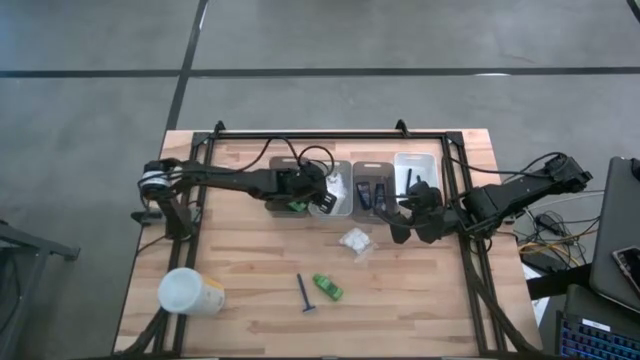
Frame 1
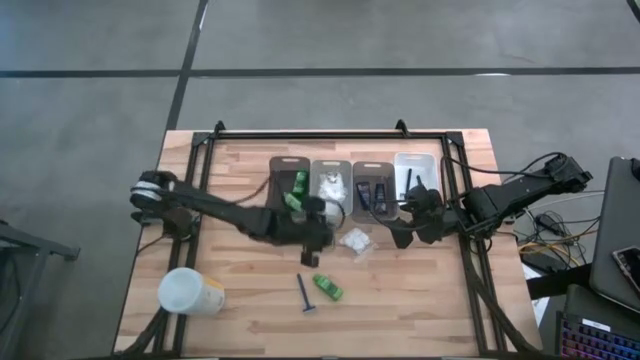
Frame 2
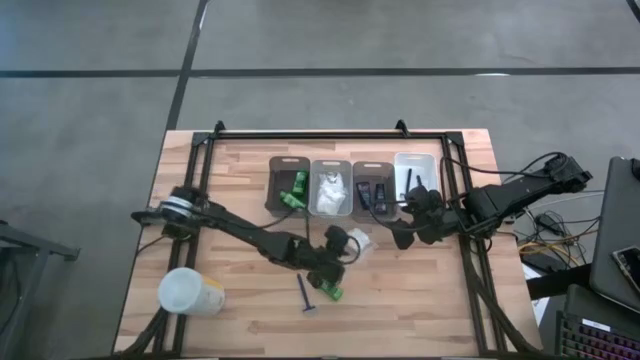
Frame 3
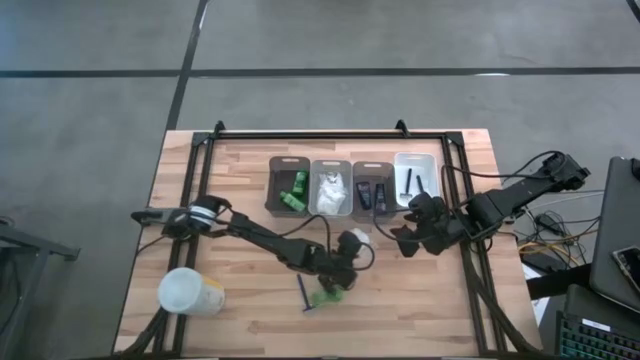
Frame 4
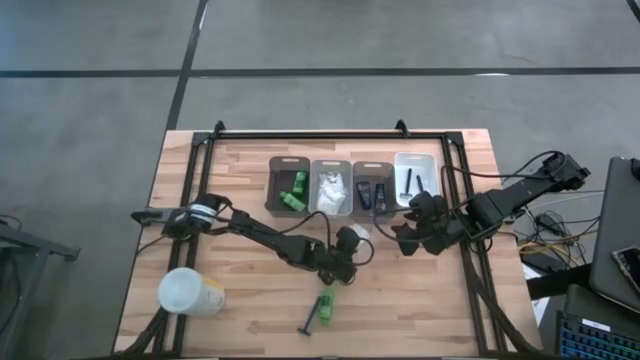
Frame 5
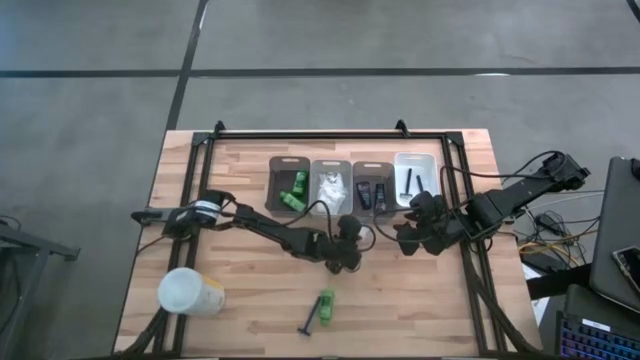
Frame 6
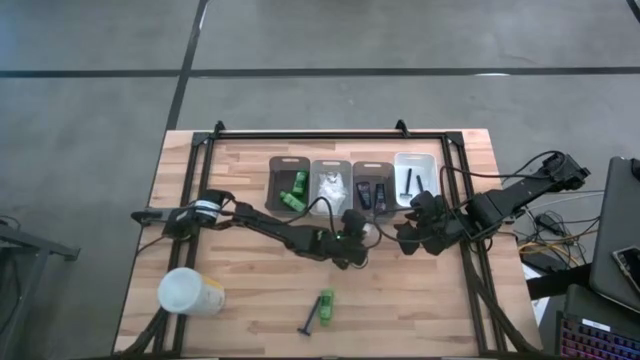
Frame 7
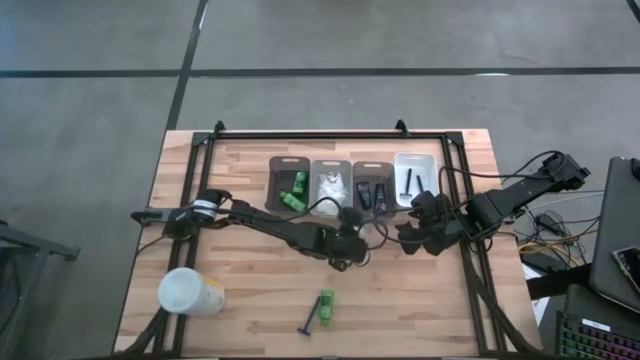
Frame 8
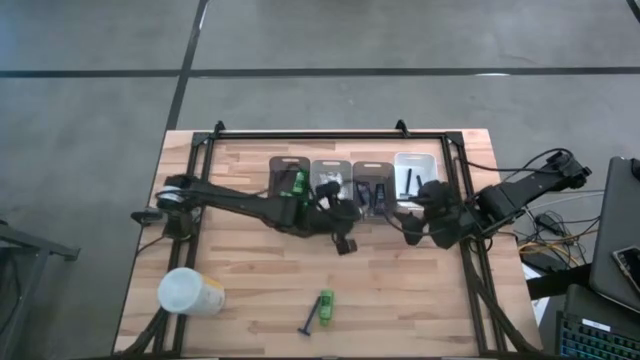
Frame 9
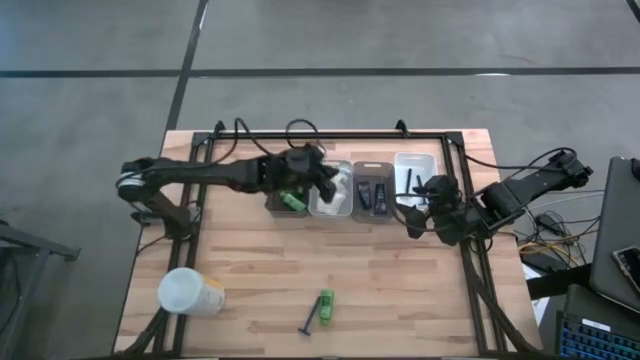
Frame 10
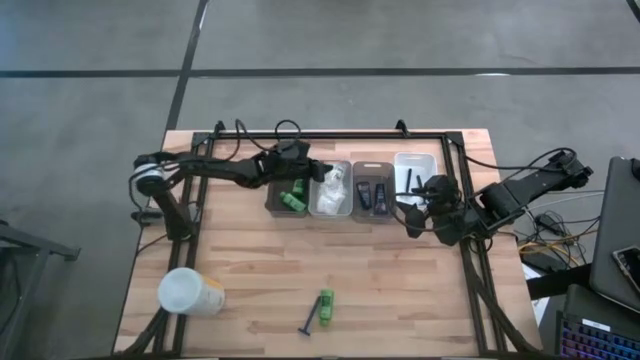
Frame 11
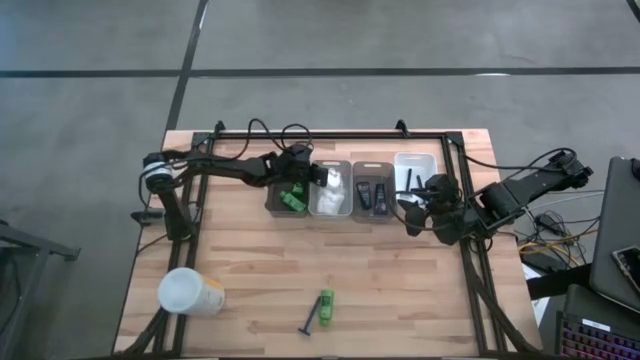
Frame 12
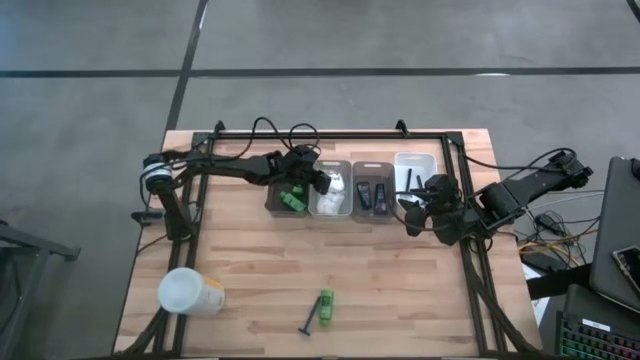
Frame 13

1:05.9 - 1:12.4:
Task: Pick & Place Travel size toiletries
Put the white cotton pack into the gray bin

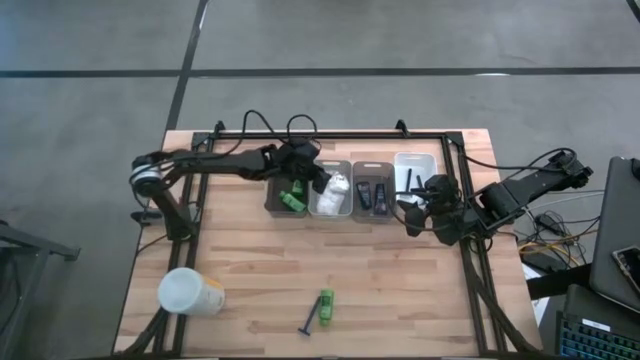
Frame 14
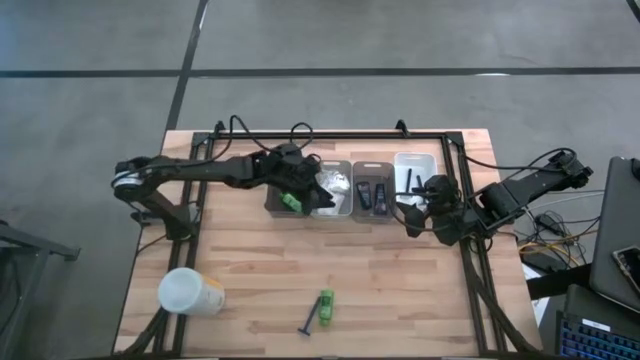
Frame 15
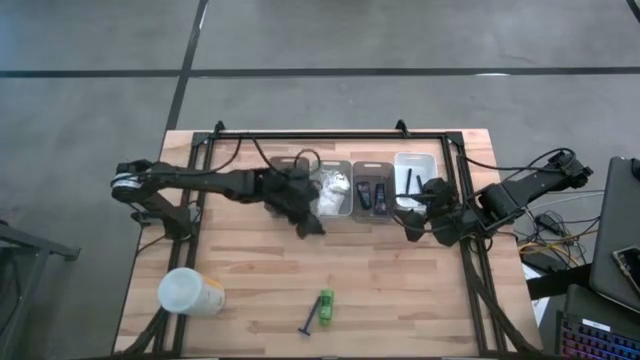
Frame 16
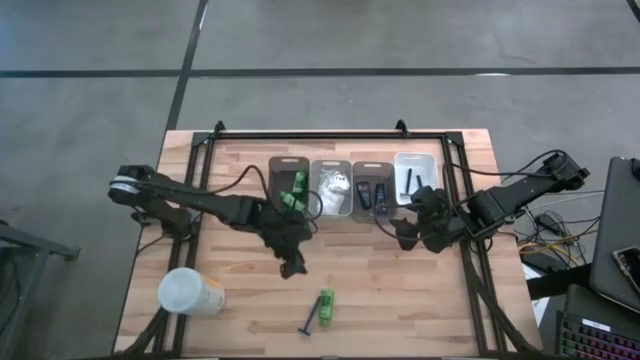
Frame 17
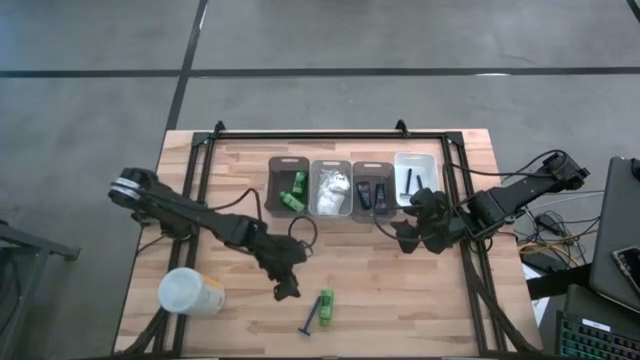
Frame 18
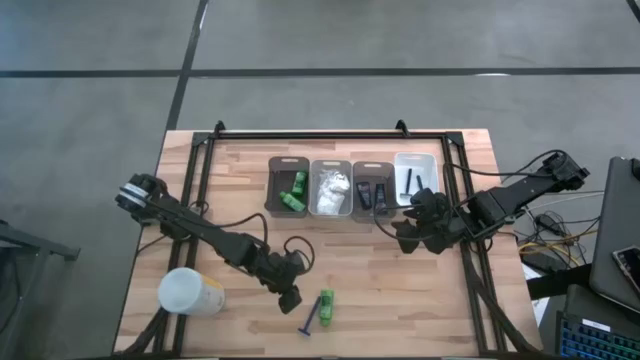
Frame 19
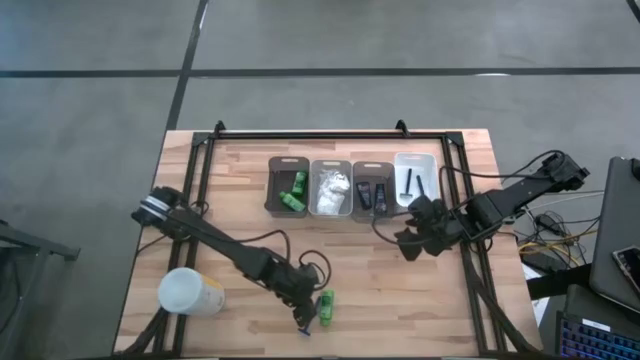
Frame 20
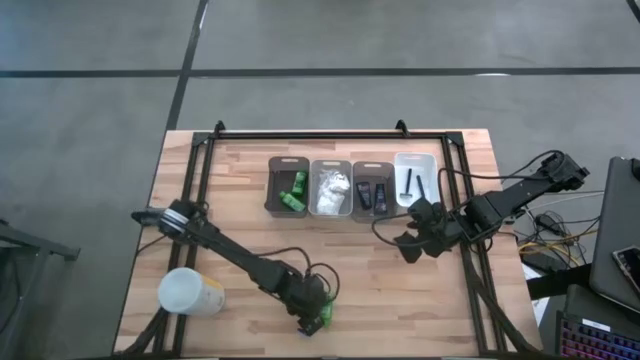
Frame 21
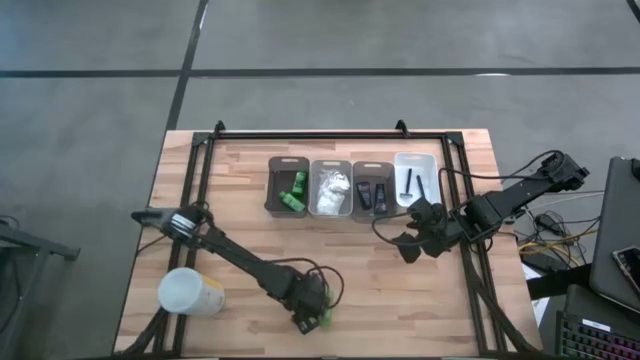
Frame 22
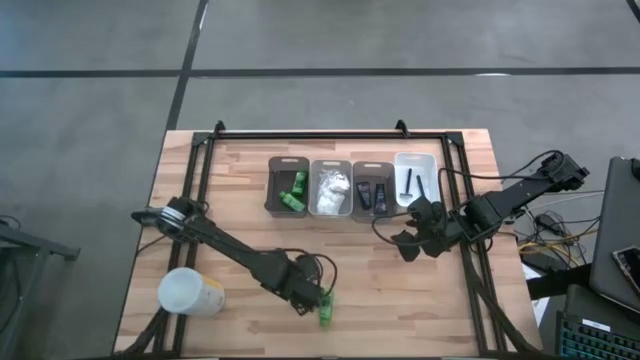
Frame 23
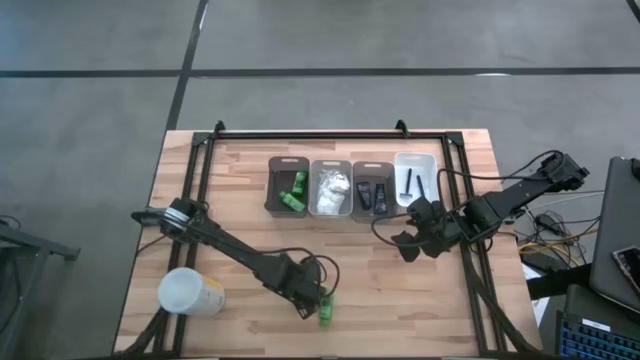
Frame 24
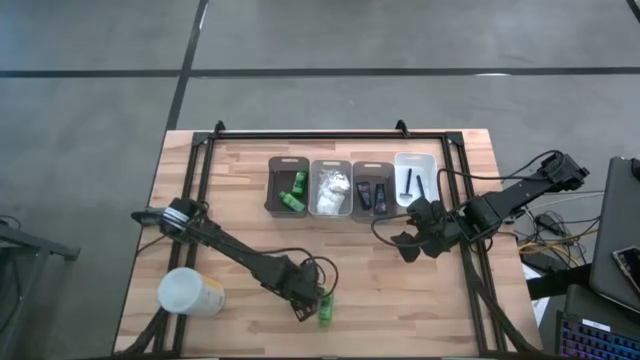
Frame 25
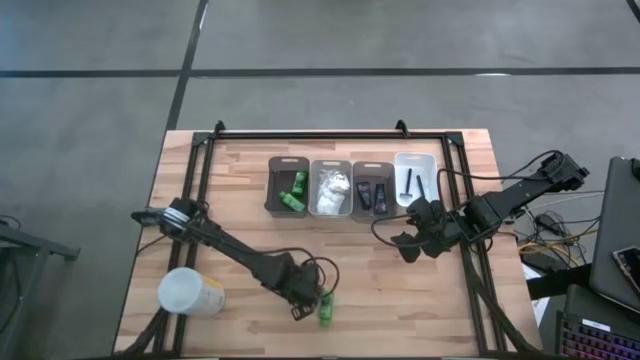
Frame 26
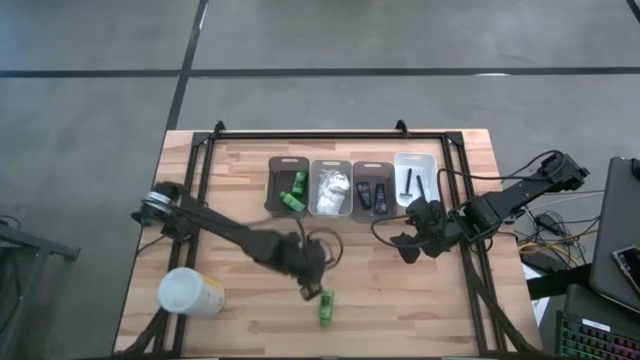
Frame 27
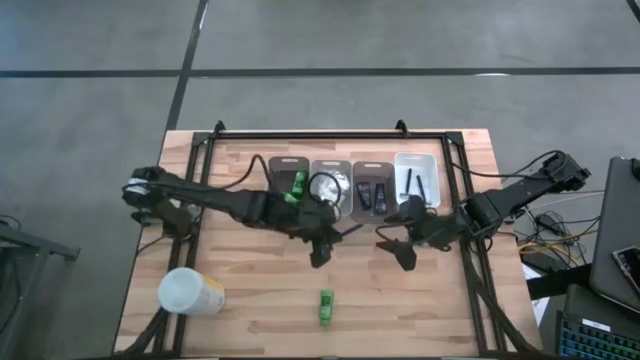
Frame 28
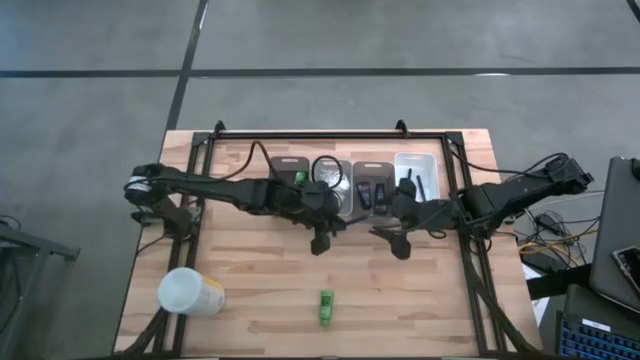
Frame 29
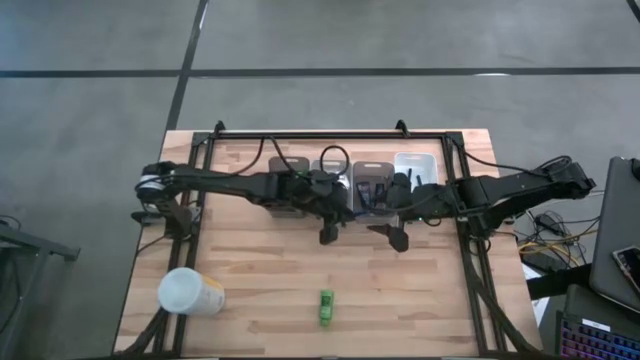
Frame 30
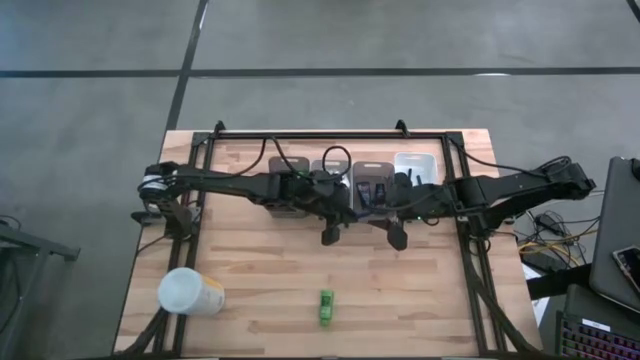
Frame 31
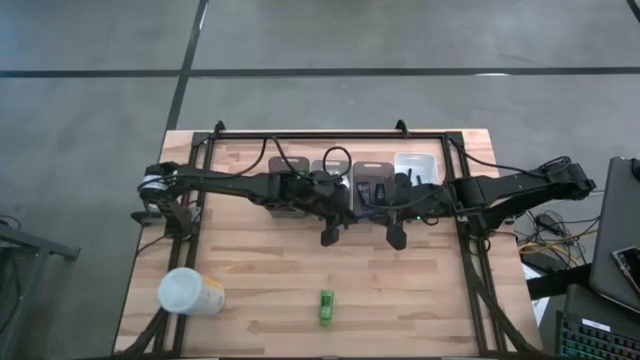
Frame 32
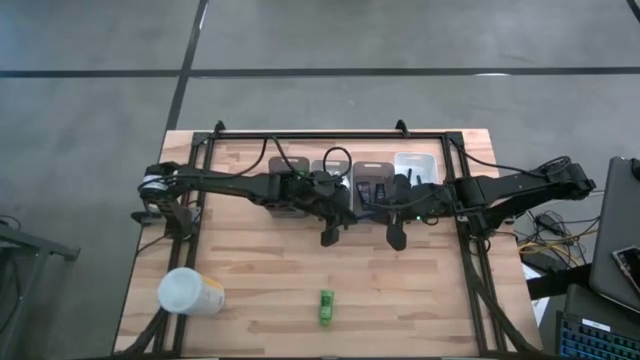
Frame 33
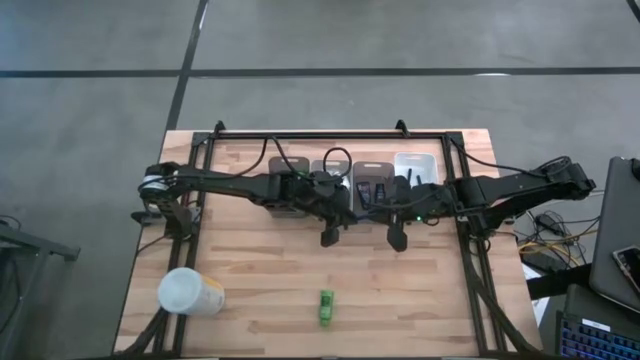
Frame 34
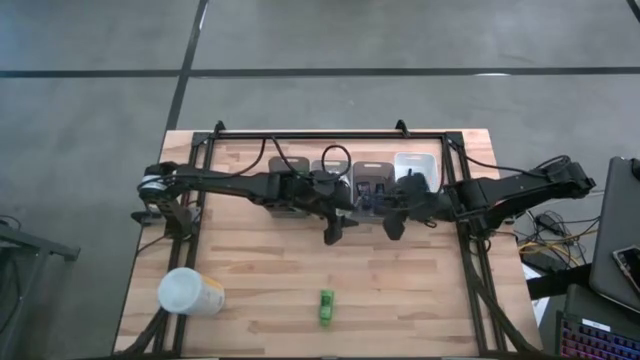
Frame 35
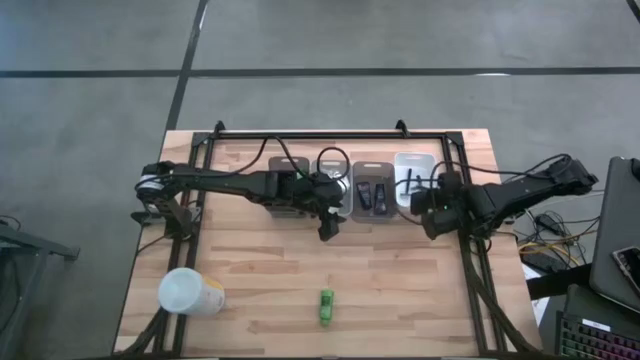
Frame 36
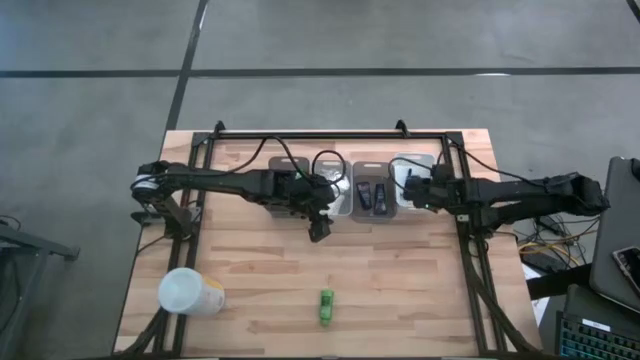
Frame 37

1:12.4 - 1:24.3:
Put the blue razor into the white bin

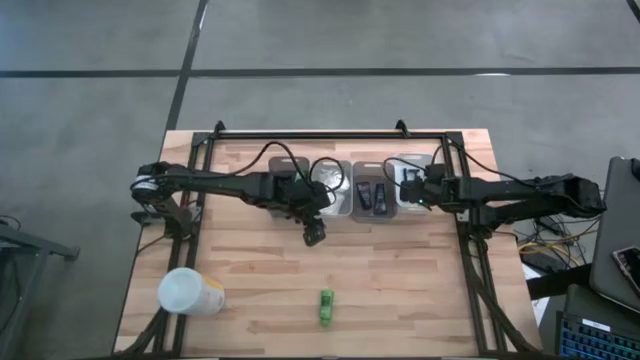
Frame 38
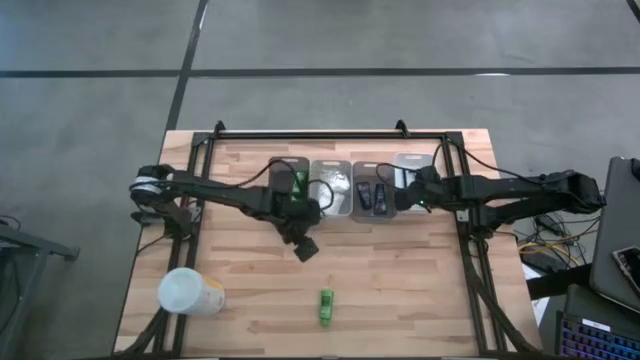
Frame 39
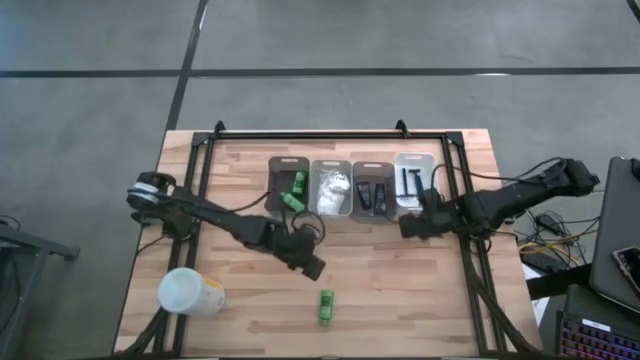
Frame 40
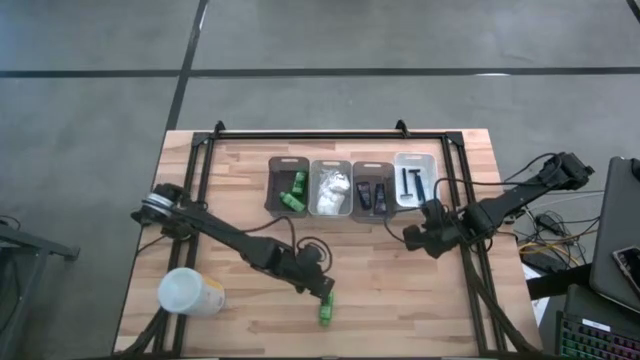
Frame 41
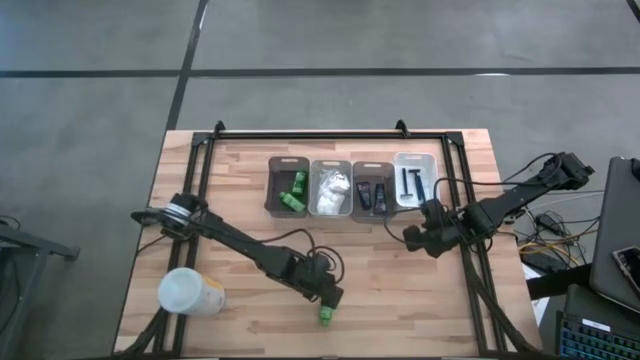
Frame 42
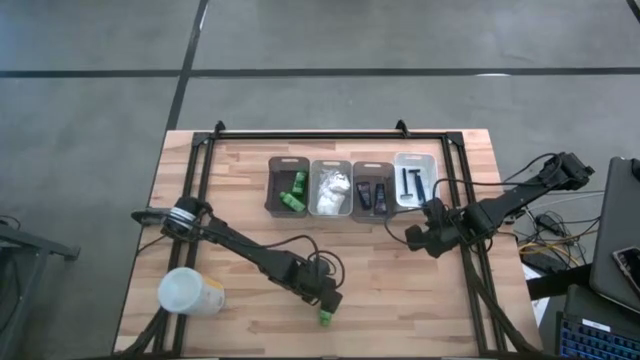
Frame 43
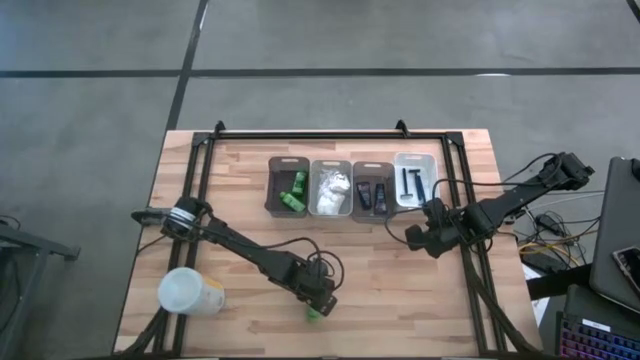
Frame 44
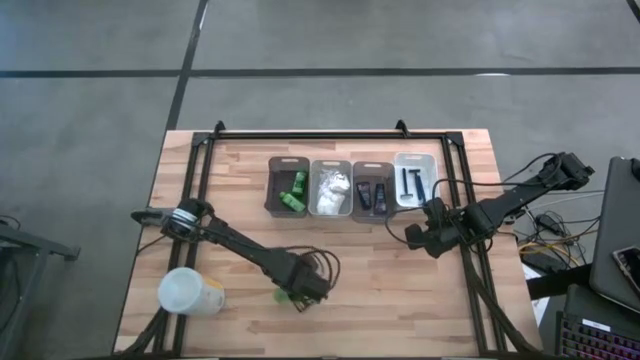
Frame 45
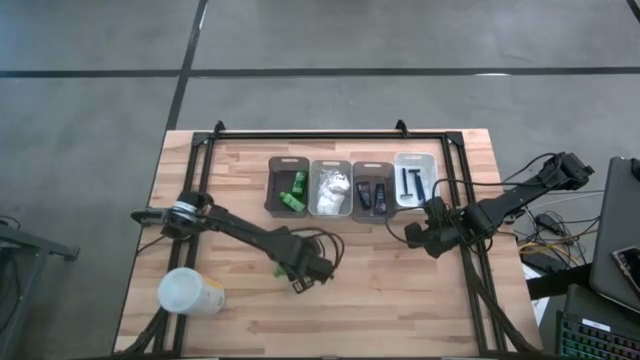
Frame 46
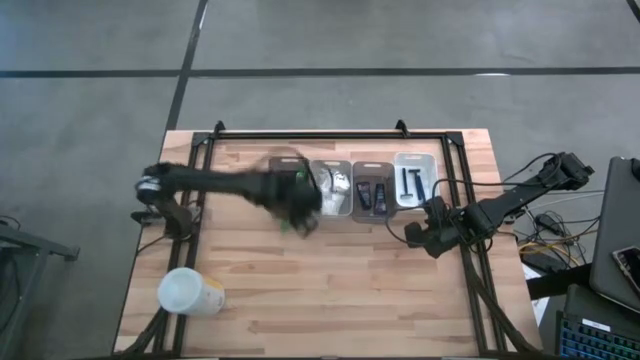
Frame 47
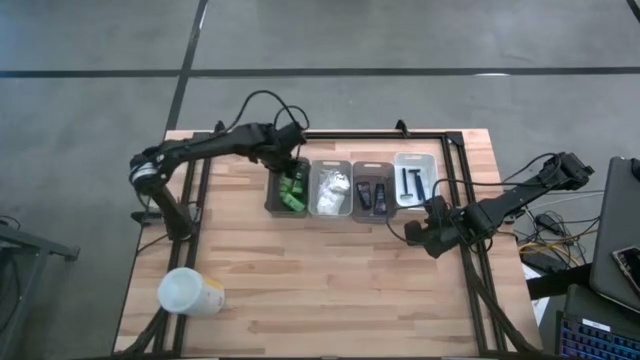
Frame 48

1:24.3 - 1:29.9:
Put the green shampoo into the left black bin
